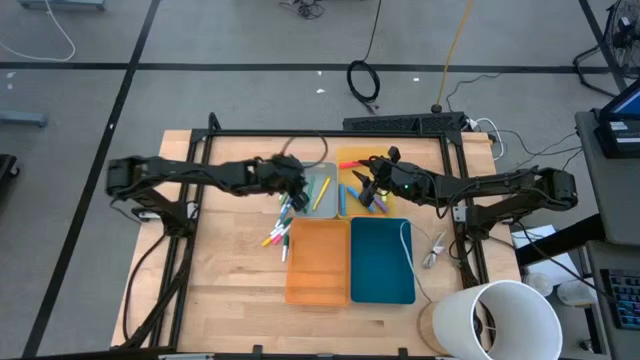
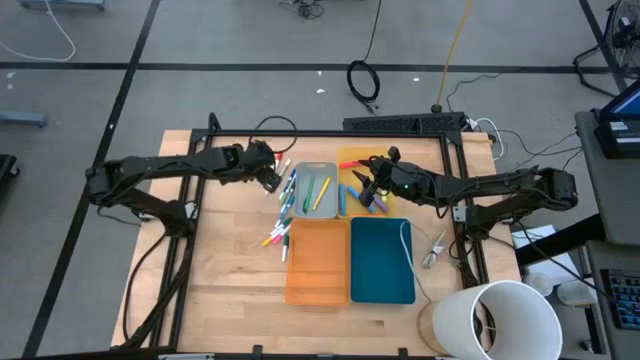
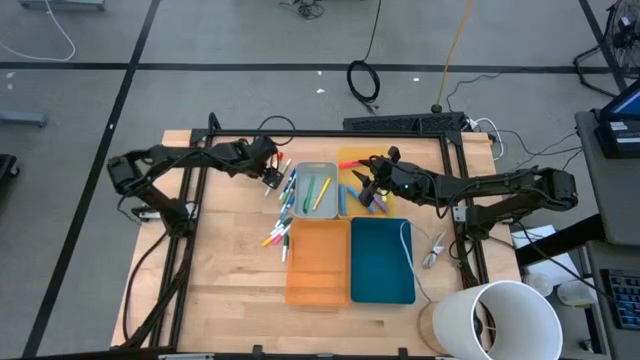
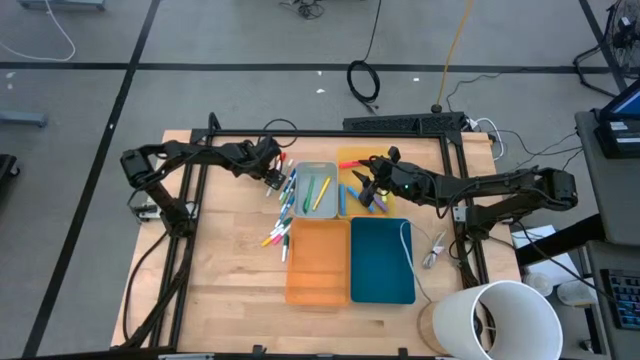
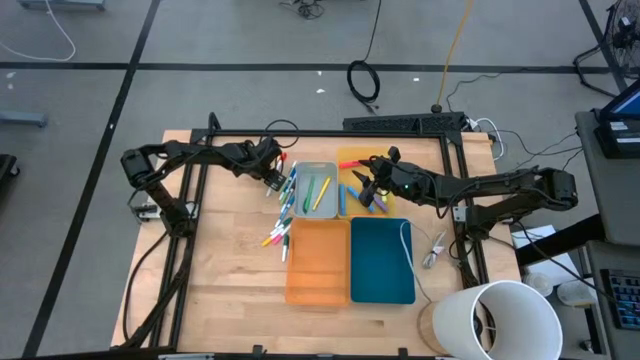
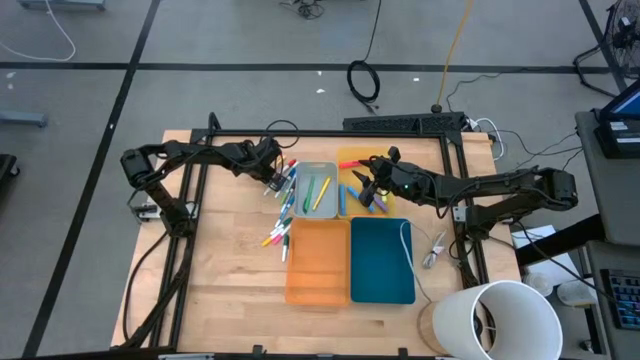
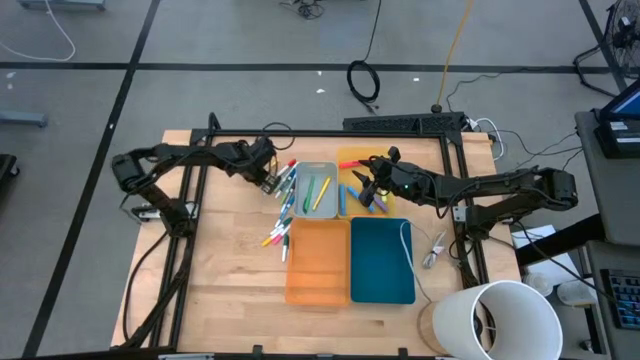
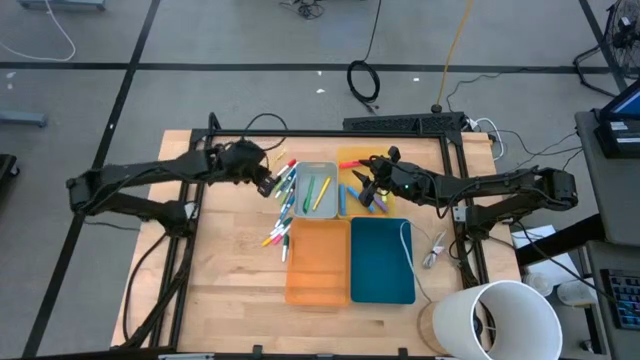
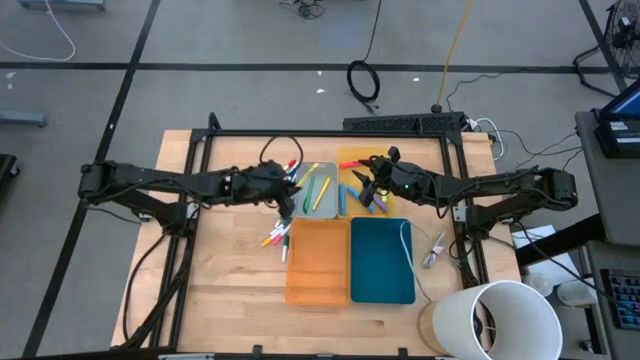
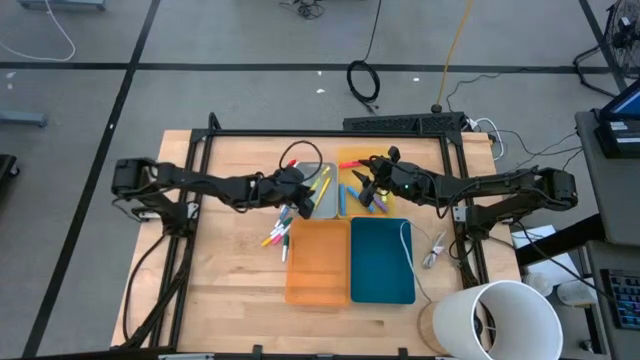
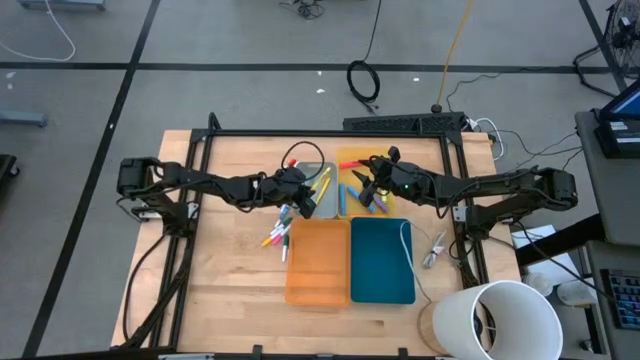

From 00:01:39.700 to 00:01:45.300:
Task: Pick & Place Markers
Put the yellow pen into the gray bin

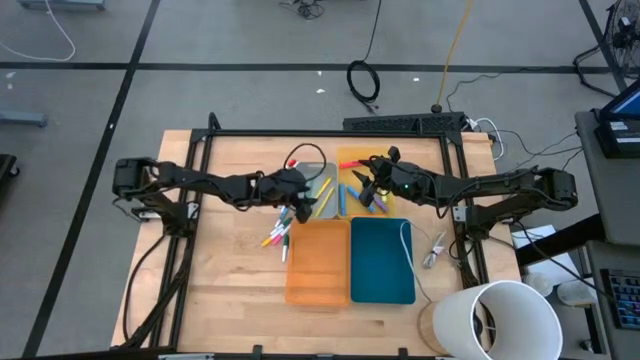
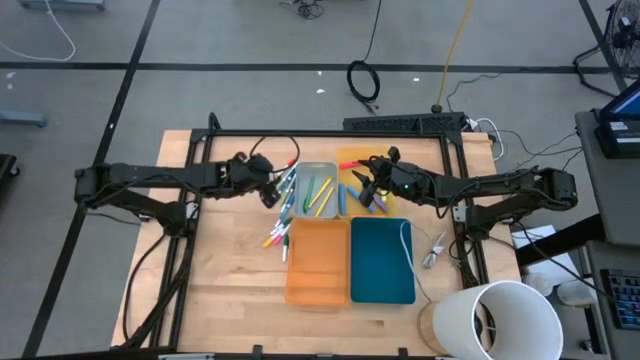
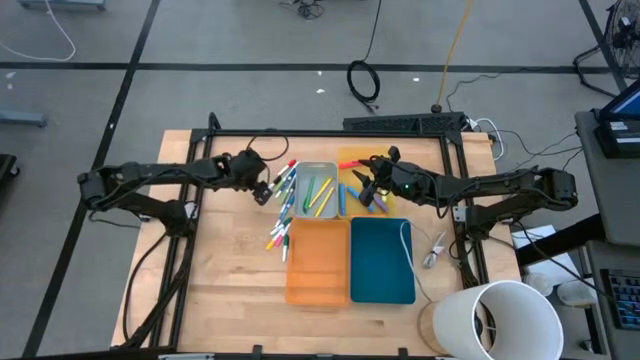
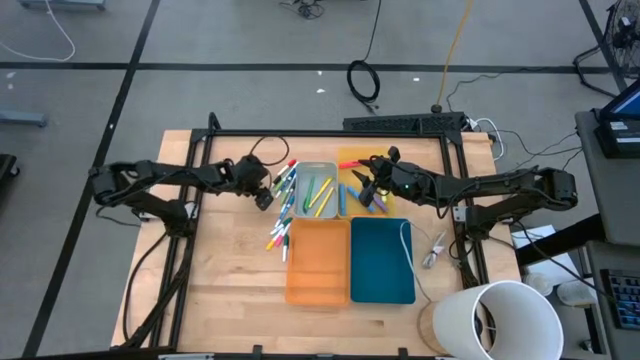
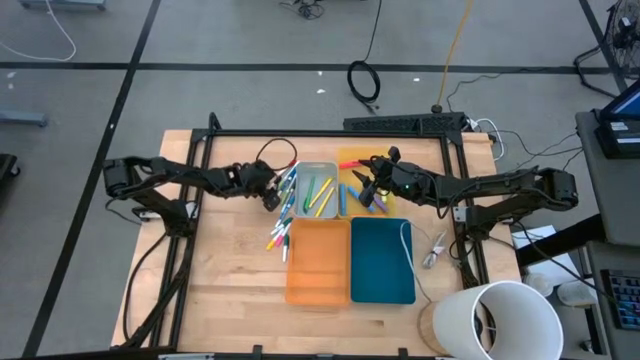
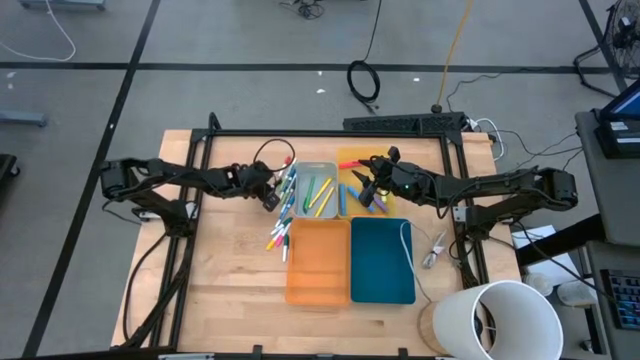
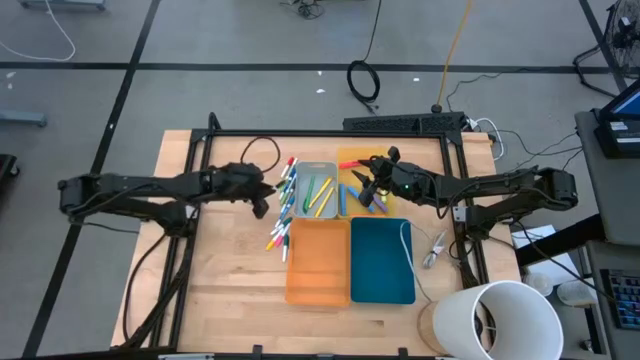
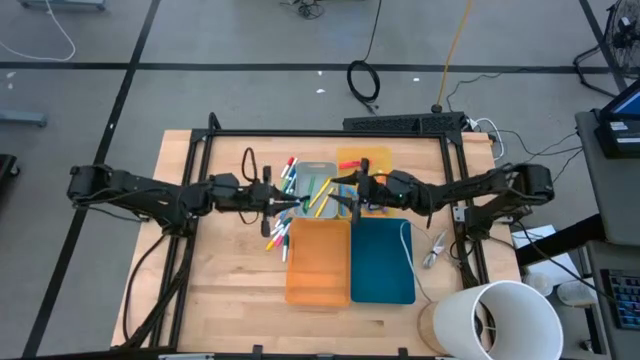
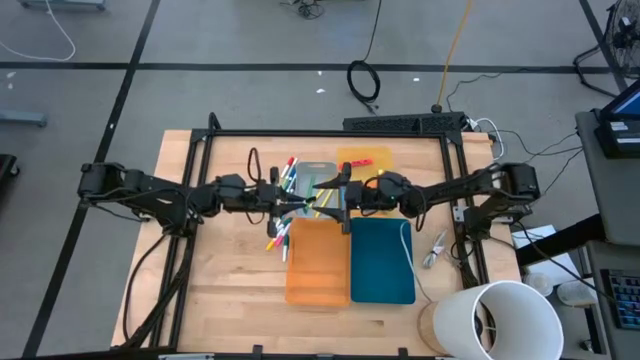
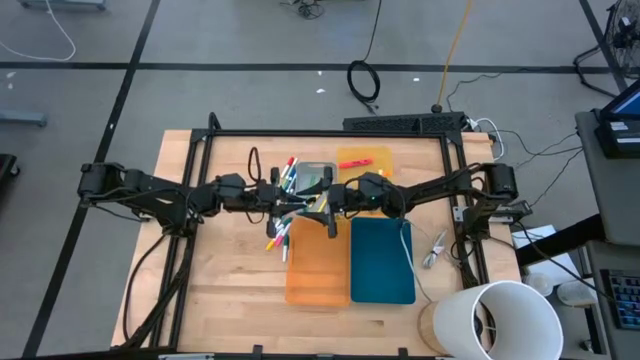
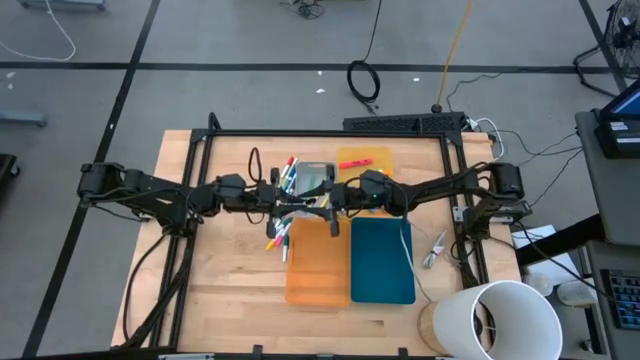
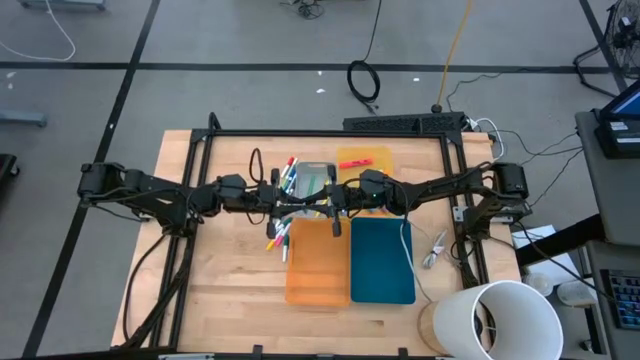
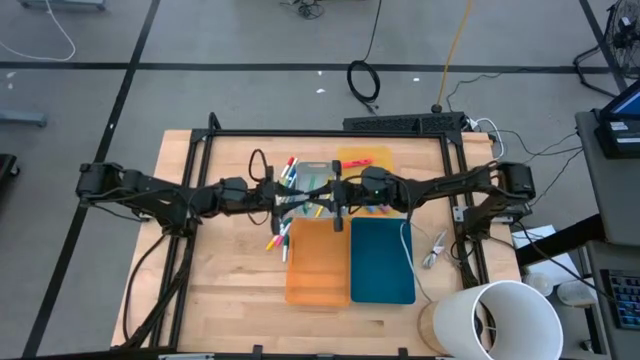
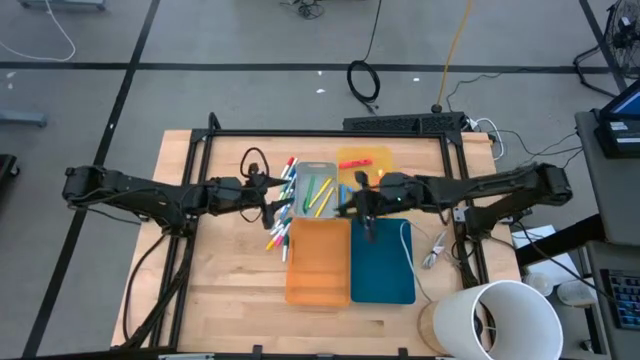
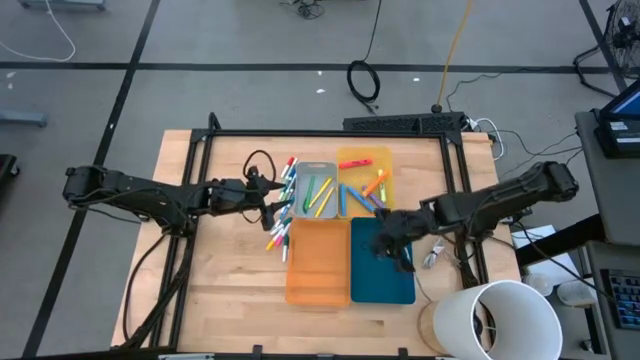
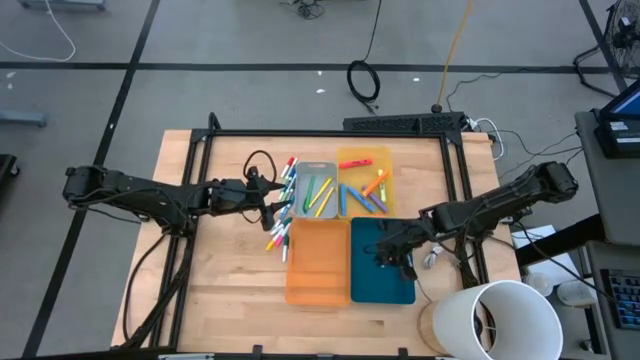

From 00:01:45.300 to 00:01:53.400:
Put the white and black highlighter pen into the blue bin

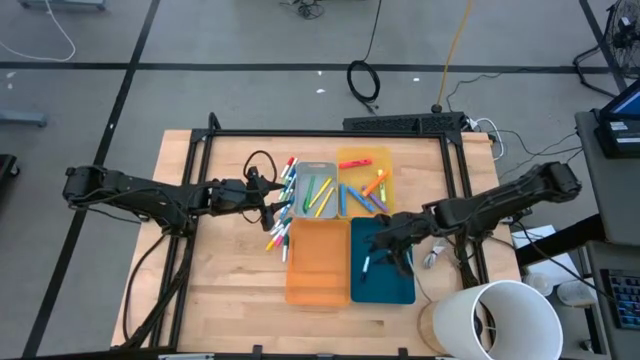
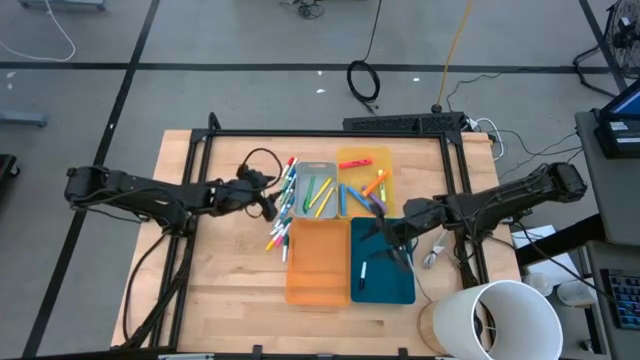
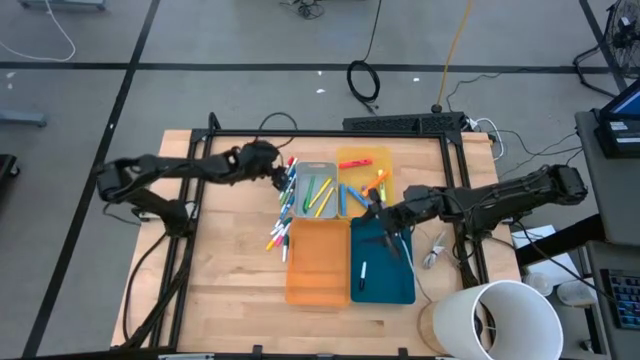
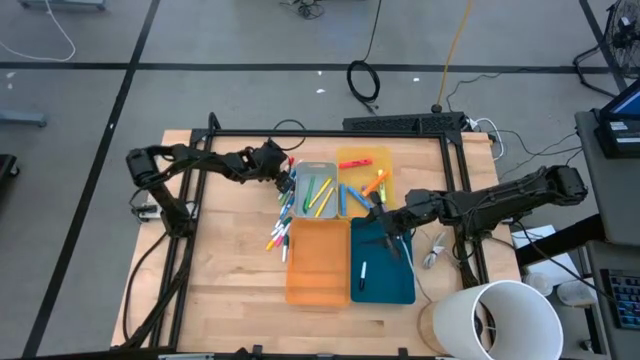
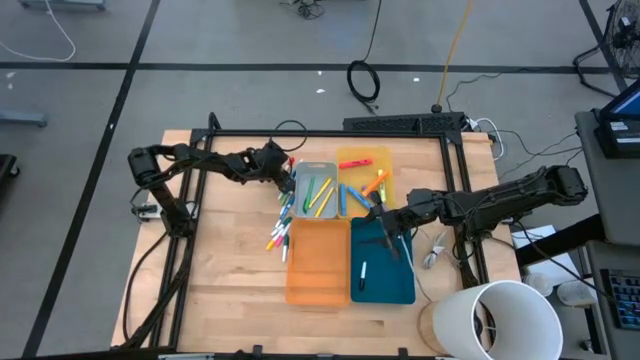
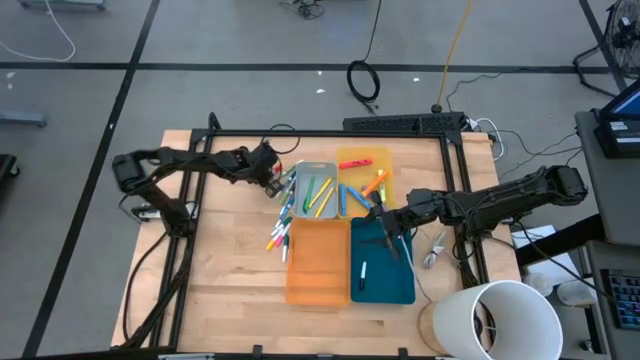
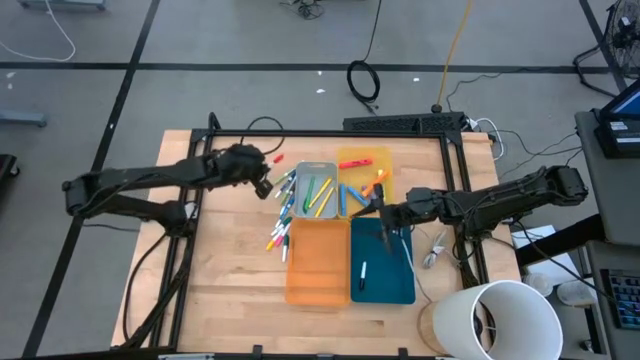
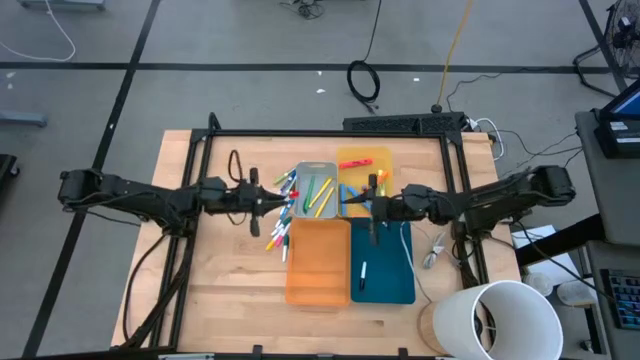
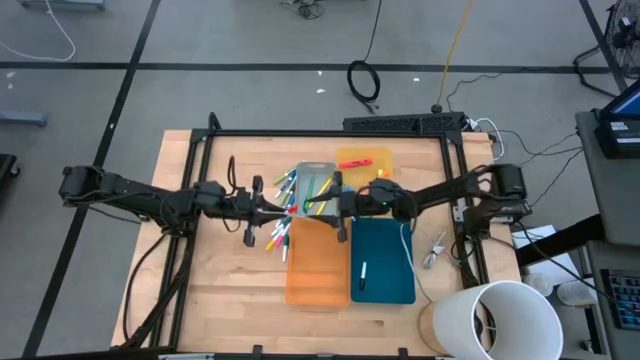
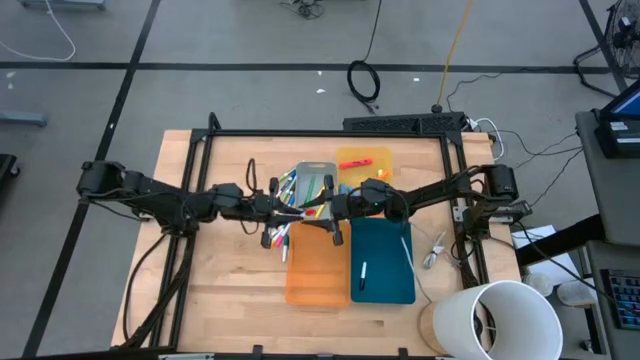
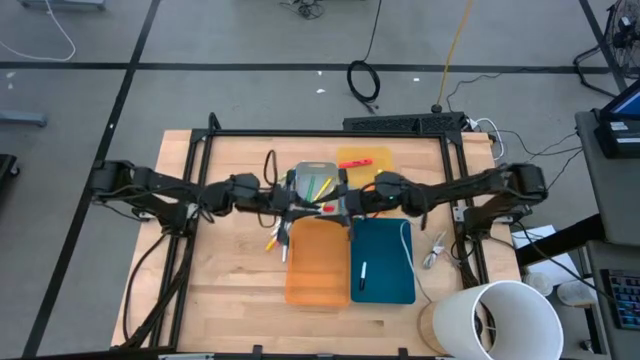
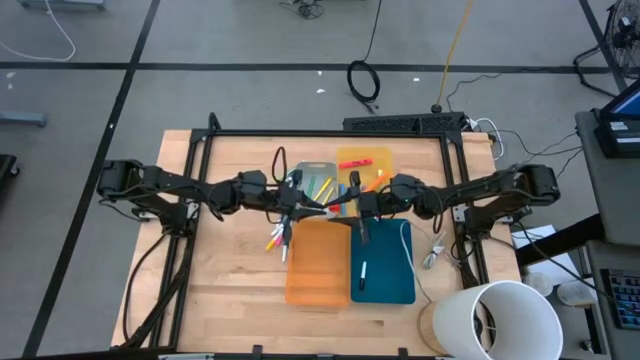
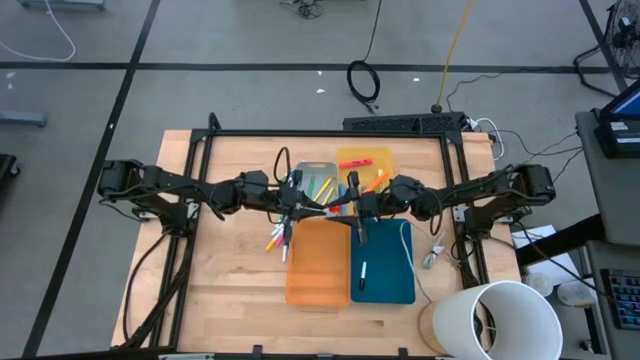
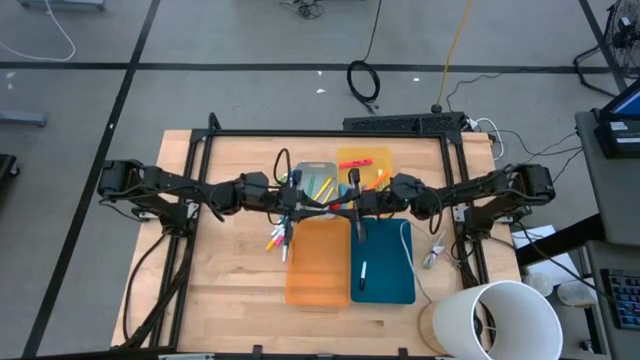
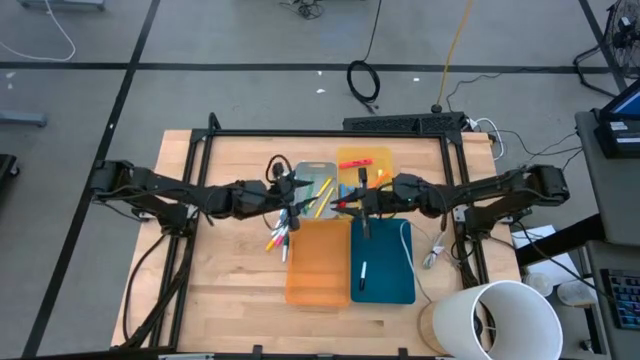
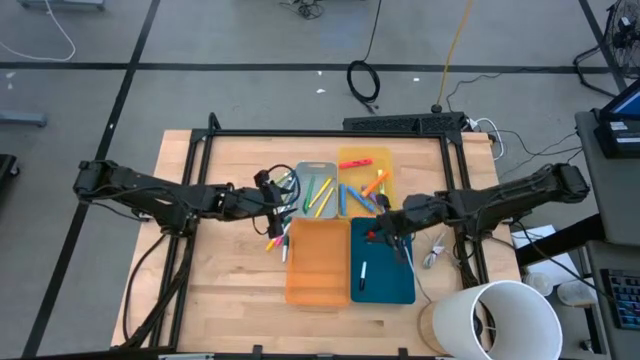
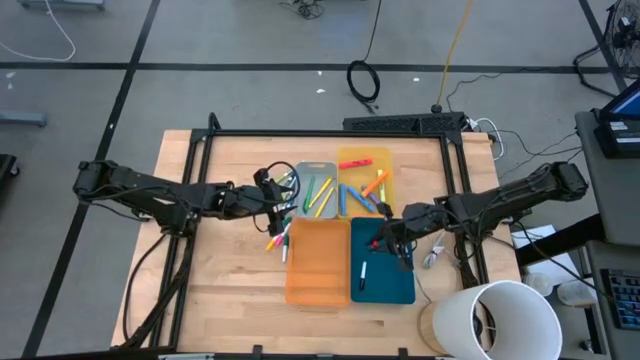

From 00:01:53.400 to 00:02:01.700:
Put the white and red highlighter pen into the blue bin
